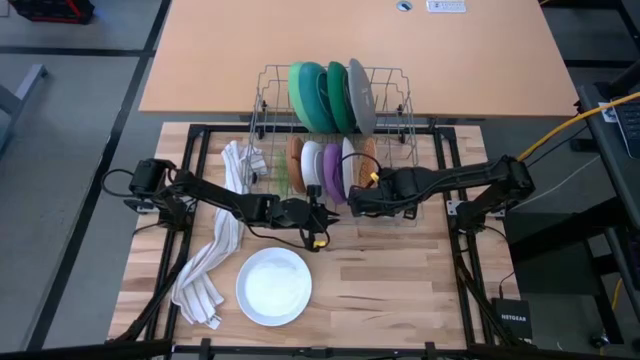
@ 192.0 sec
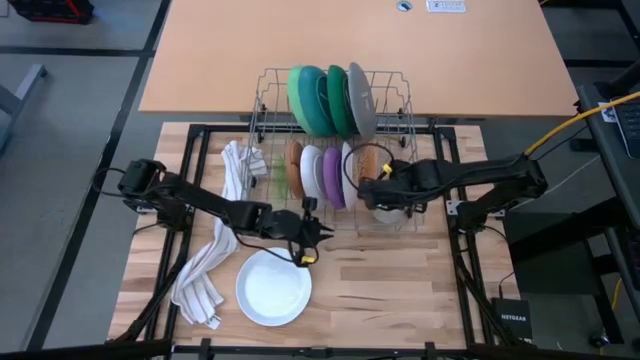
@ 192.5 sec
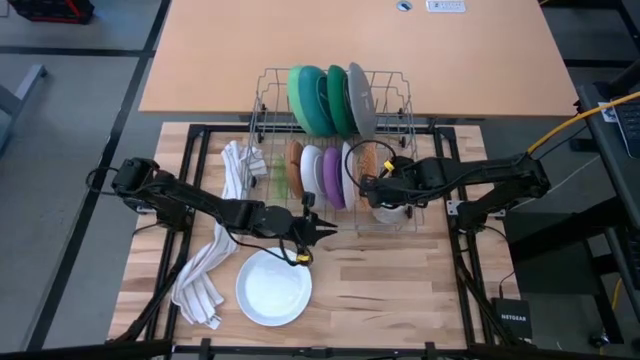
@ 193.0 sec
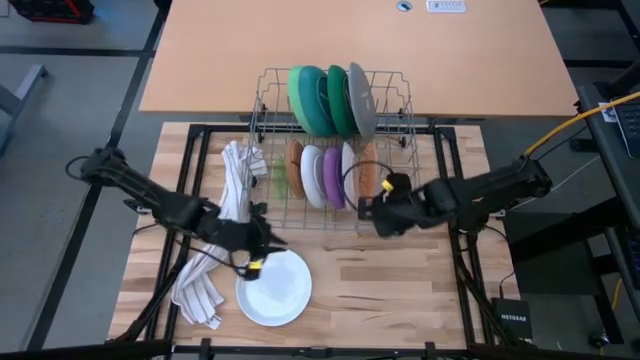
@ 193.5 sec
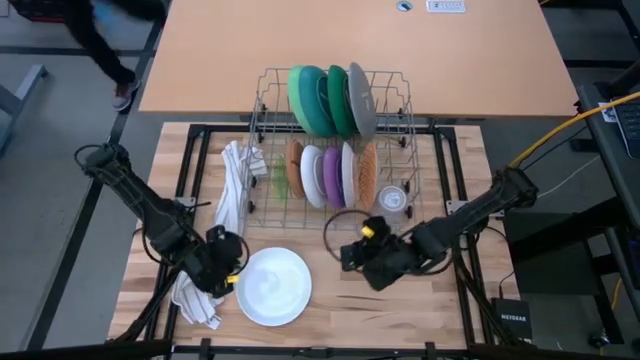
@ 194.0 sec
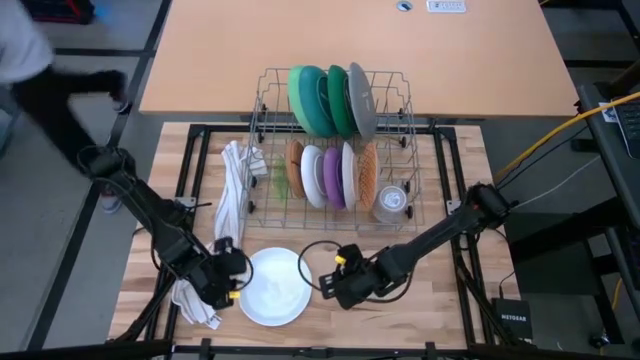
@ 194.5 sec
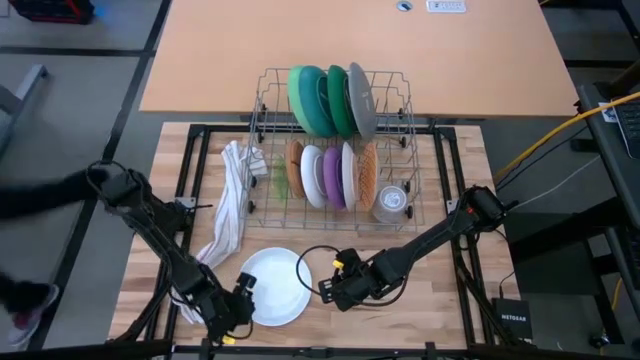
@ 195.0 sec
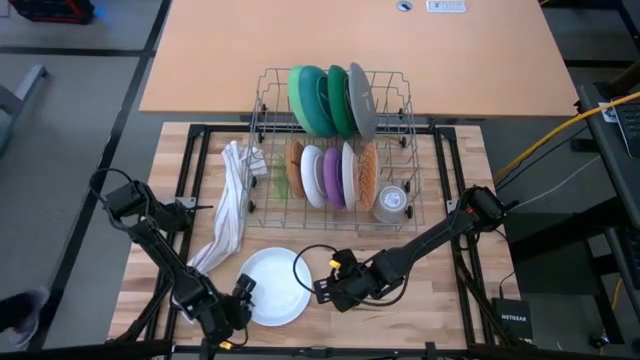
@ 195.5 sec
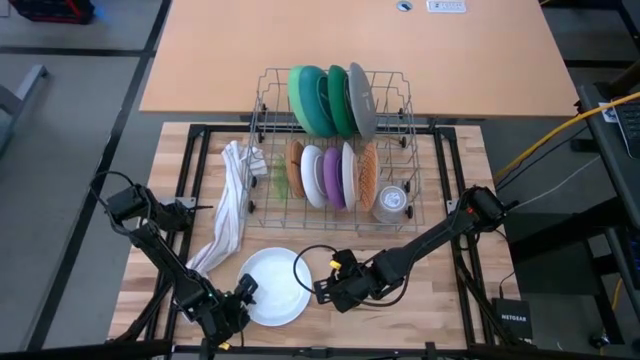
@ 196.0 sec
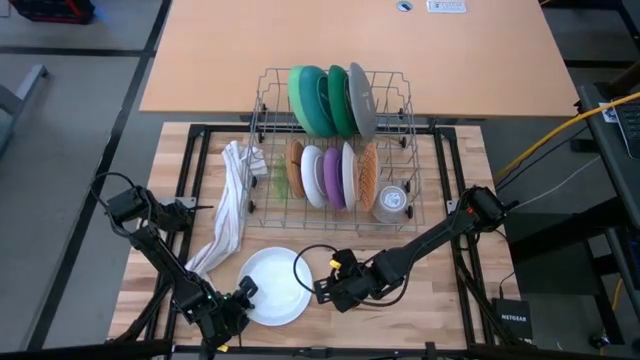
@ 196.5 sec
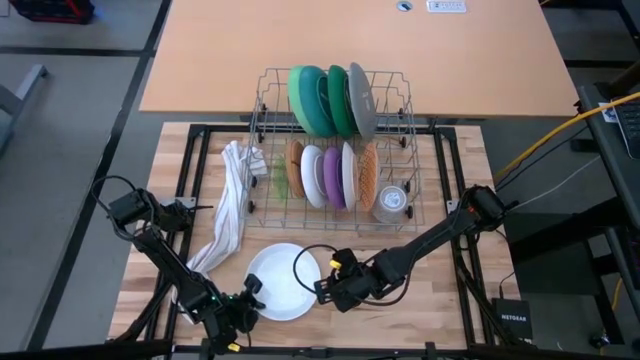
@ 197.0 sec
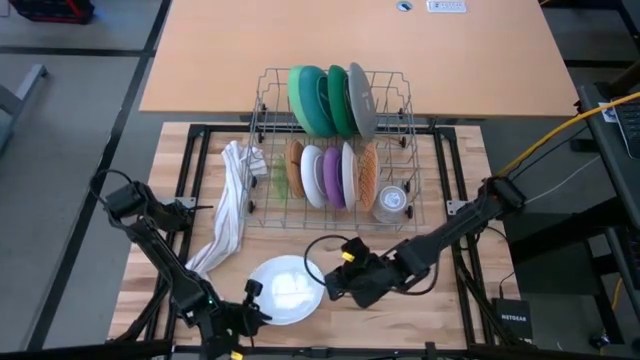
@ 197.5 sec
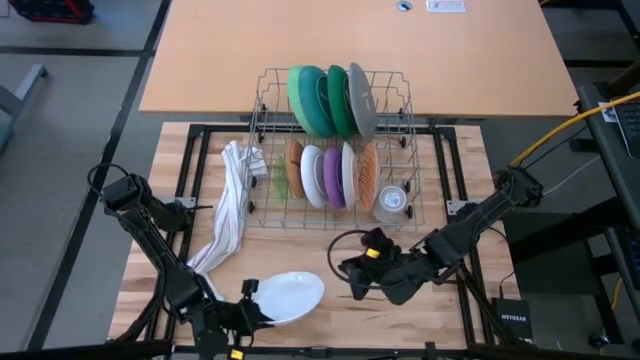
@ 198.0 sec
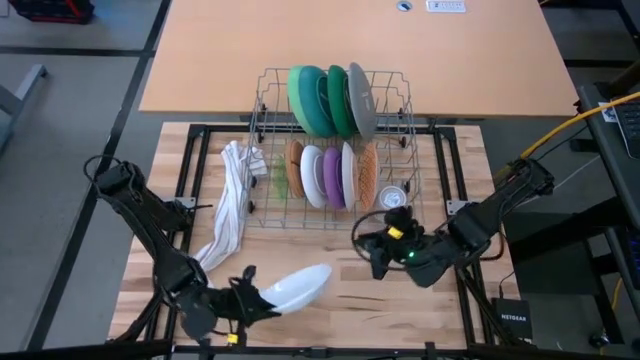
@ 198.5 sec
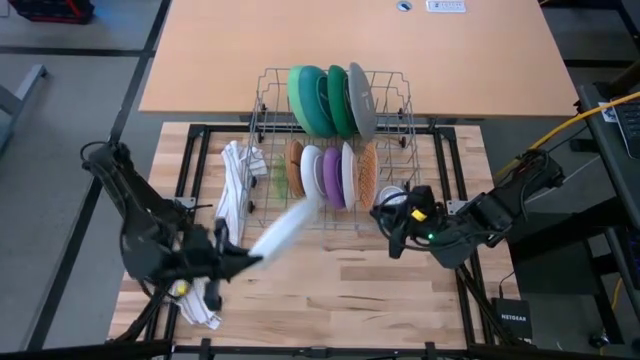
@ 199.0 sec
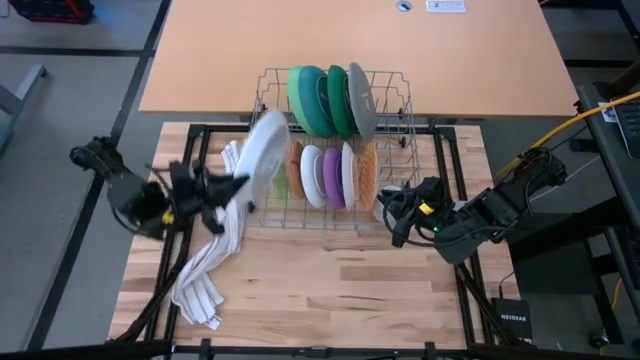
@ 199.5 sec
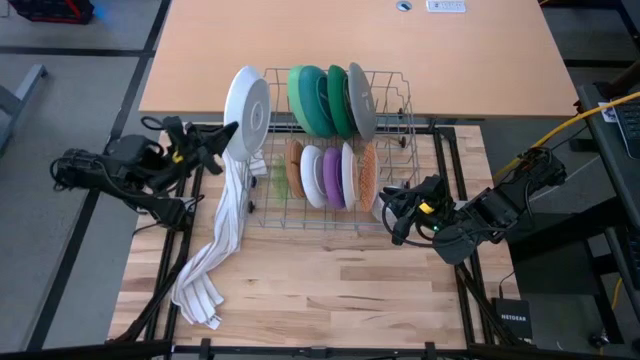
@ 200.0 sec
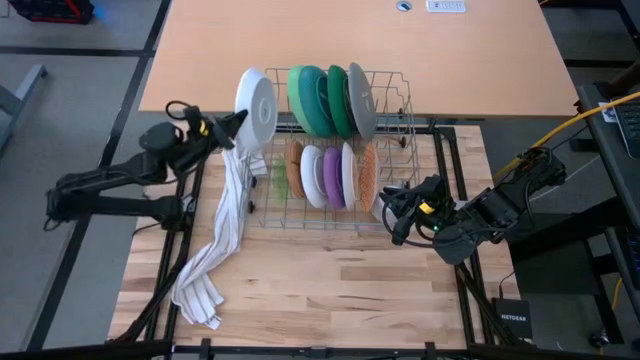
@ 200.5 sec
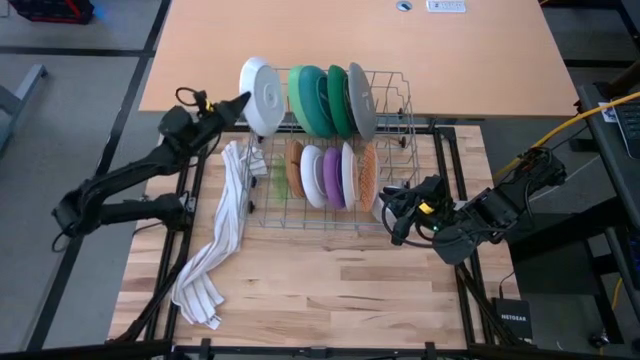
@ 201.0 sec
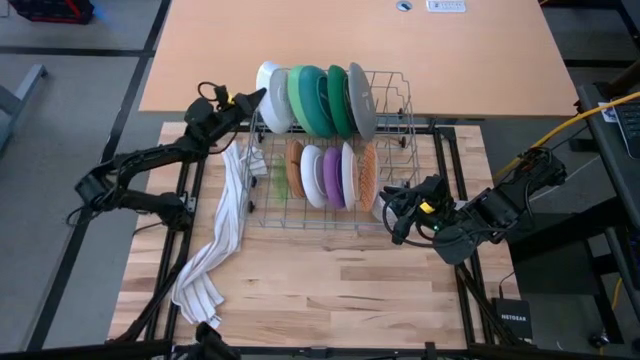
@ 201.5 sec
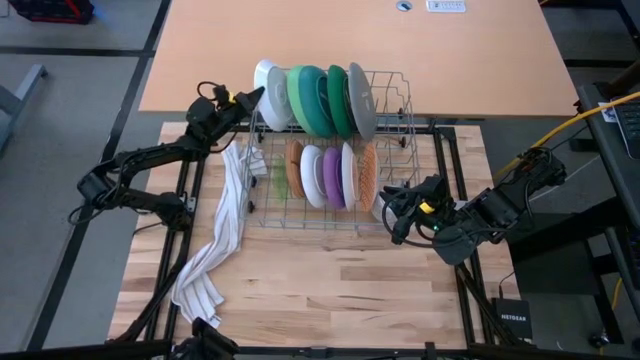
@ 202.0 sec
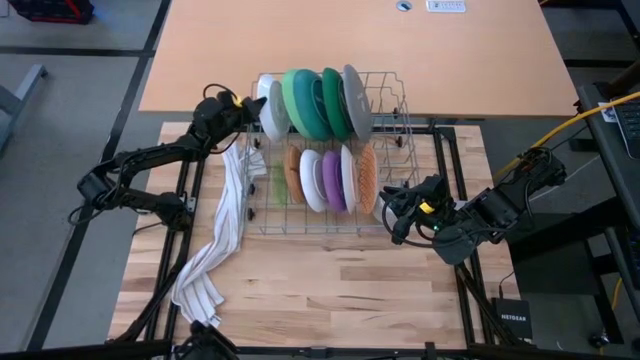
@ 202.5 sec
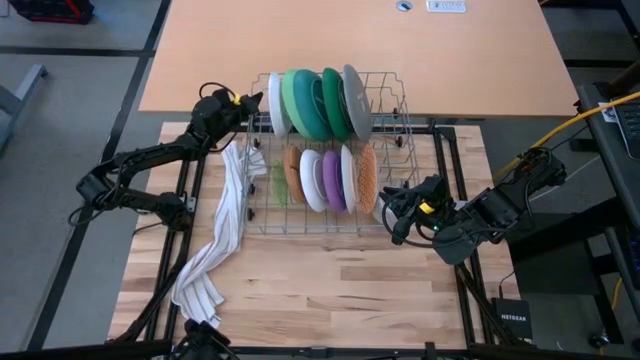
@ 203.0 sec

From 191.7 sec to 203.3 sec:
Task: Sort dishes
Put the white plate into the dish rack

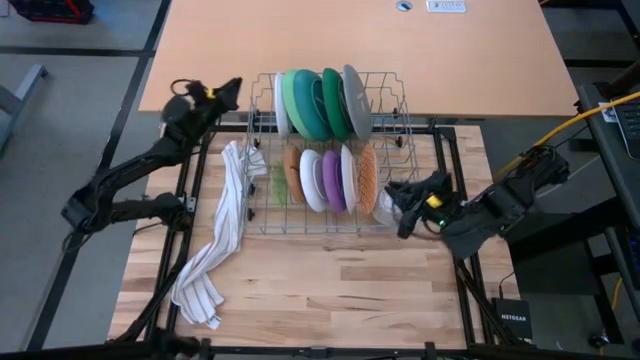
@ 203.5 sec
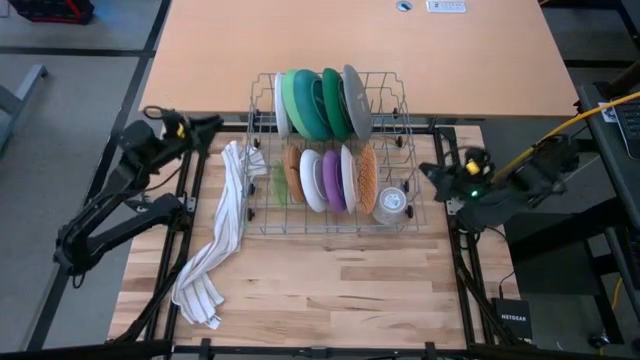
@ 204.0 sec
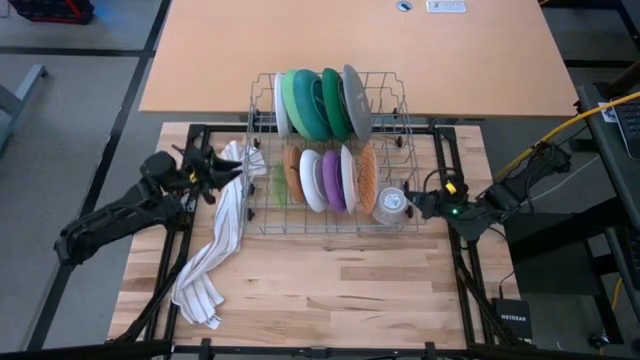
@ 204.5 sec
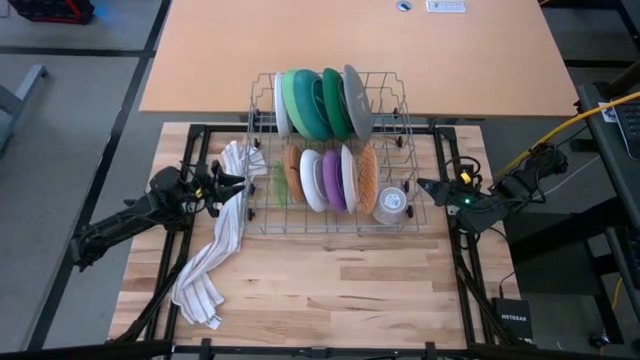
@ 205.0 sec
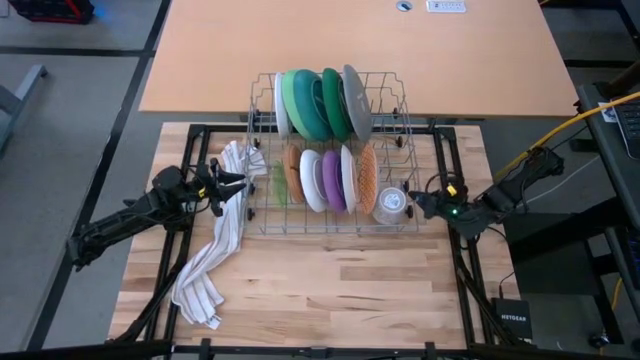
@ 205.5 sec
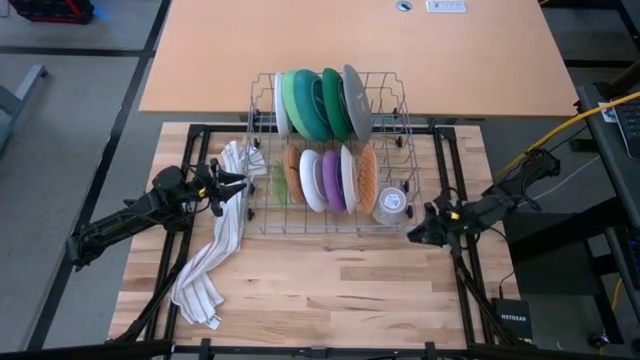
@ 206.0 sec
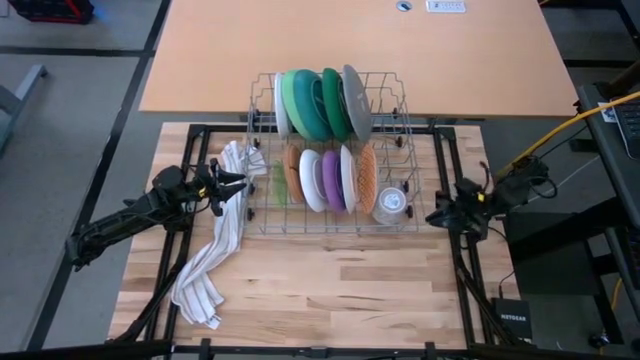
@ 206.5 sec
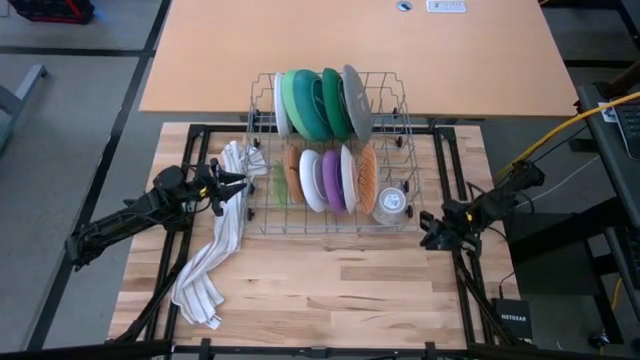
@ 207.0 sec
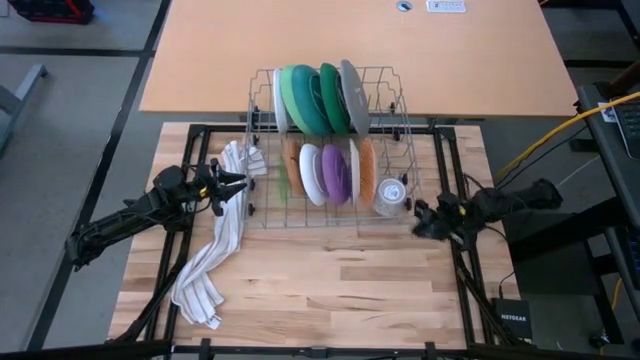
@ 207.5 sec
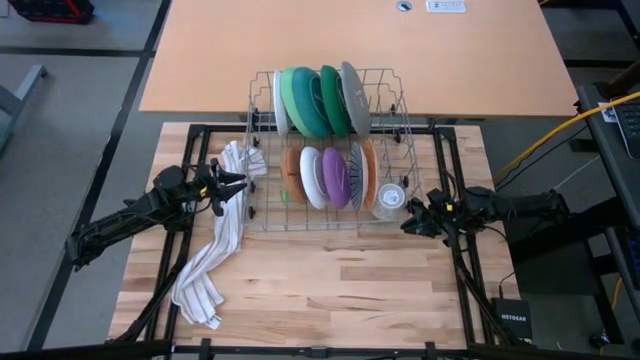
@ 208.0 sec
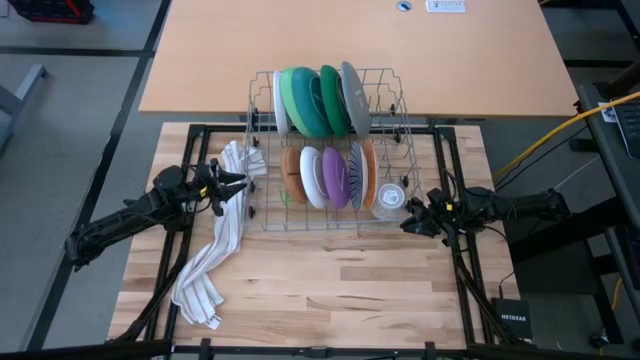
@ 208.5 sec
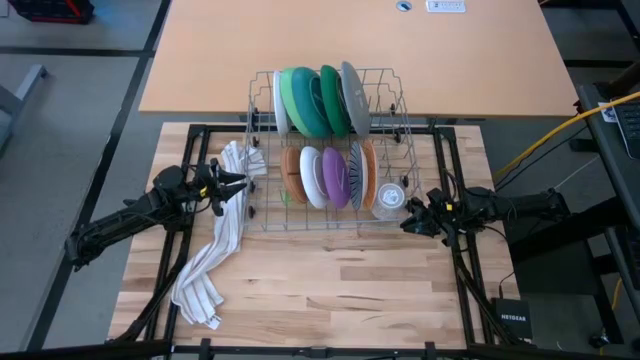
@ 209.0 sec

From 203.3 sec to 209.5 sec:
Return to Home Position

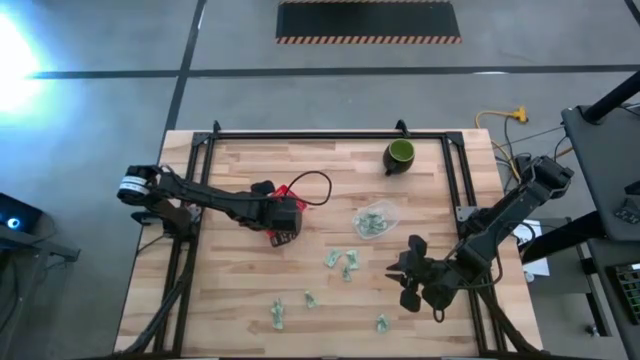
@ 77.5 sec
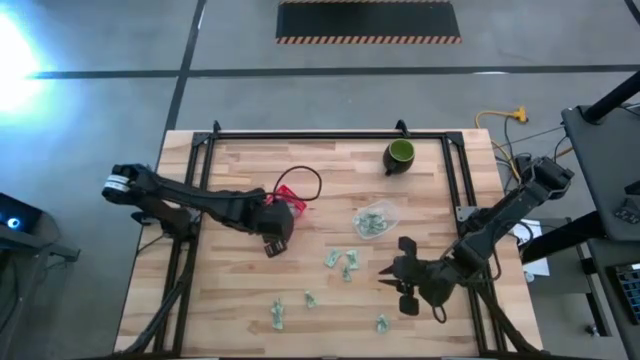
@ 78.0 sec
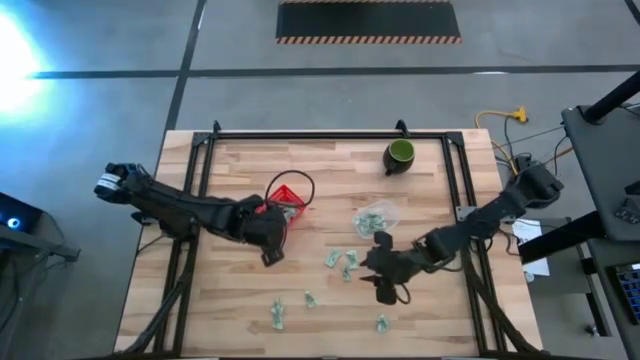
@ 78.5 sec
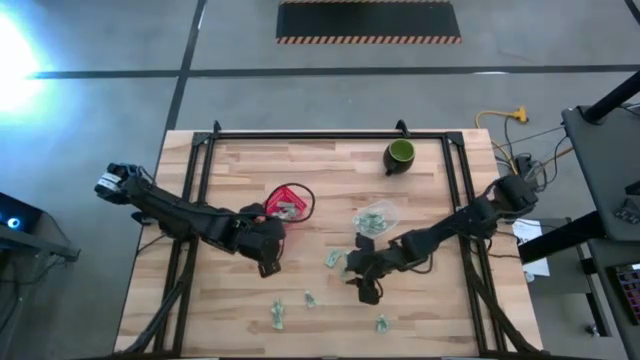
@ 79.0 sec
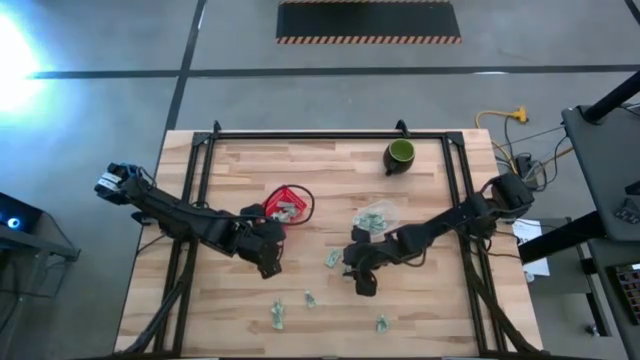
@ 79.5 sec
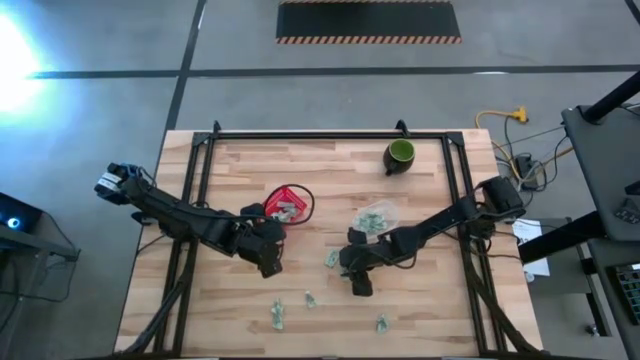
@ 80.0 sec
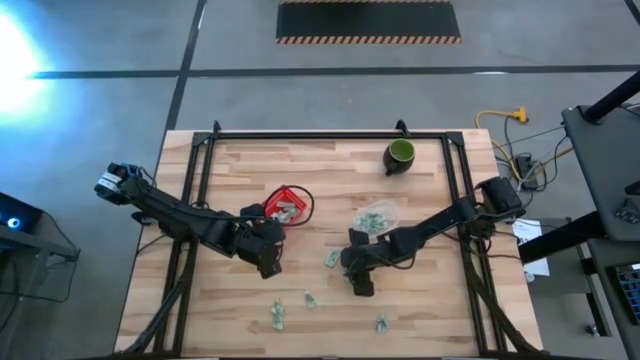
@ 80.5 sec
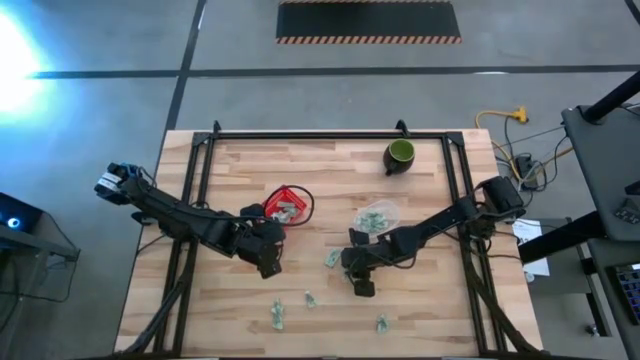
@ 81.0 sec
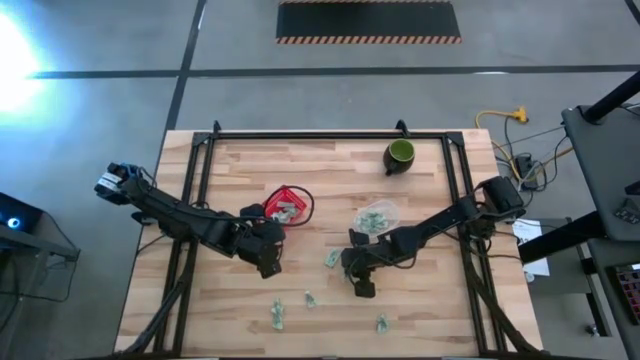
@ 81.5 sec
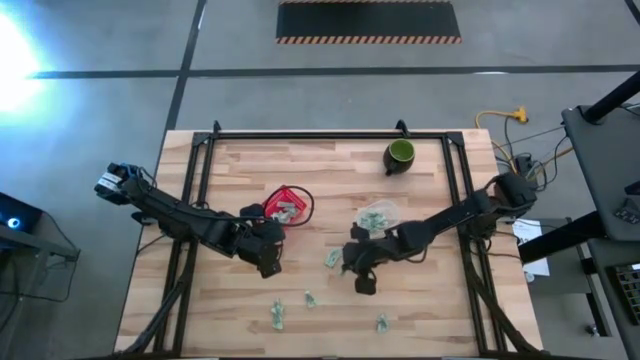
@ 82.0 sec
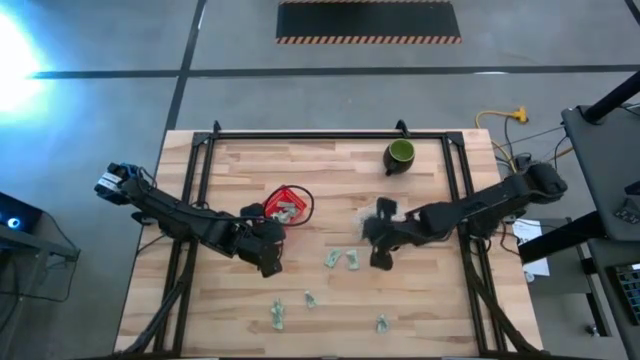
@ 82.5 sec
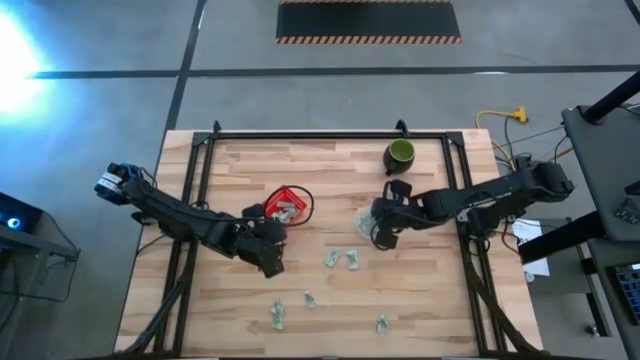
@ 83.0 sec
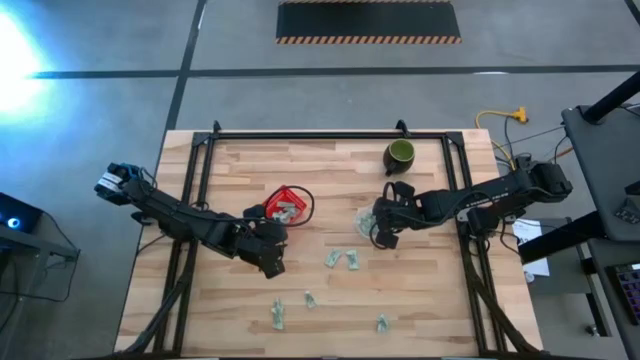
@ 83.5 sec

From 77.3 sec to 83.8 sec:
Task: Pick and place items into bin
Put the stevia packet into the transparent bin
